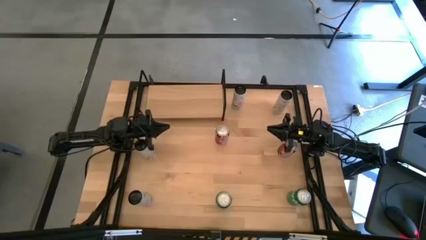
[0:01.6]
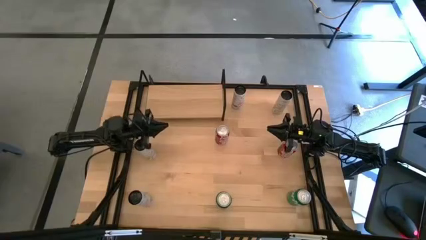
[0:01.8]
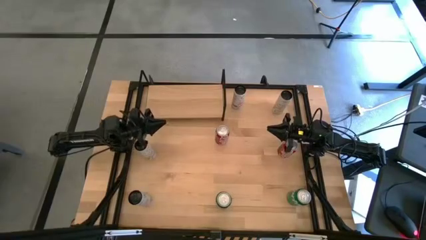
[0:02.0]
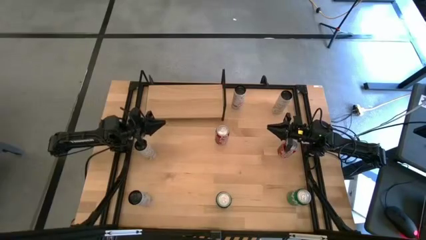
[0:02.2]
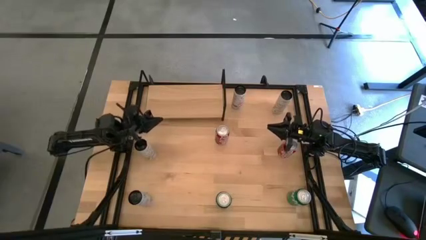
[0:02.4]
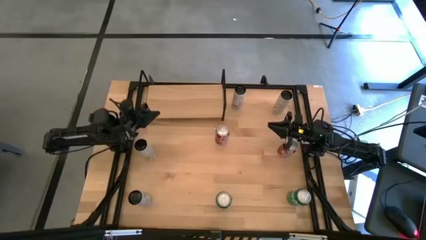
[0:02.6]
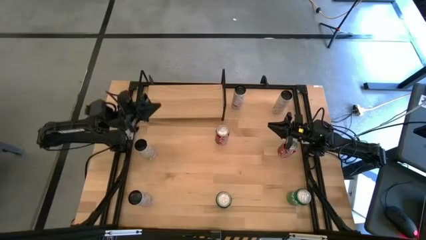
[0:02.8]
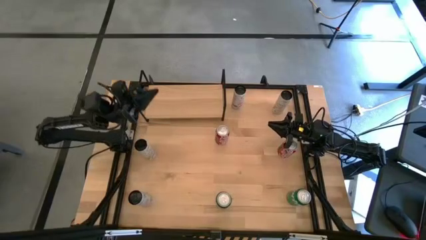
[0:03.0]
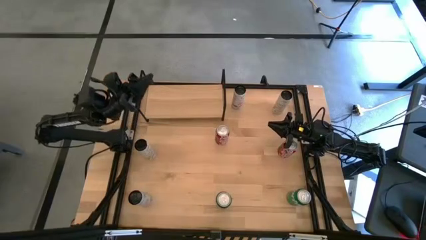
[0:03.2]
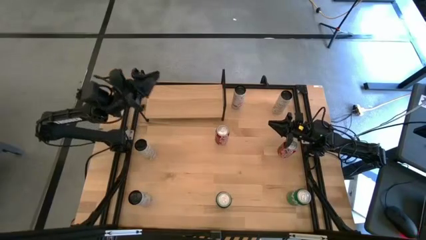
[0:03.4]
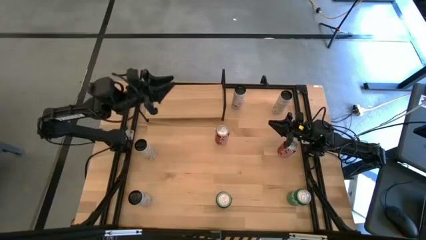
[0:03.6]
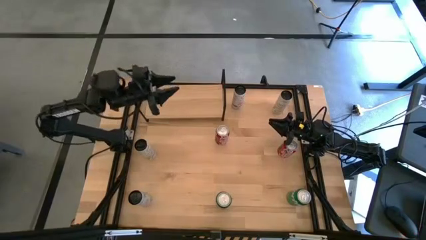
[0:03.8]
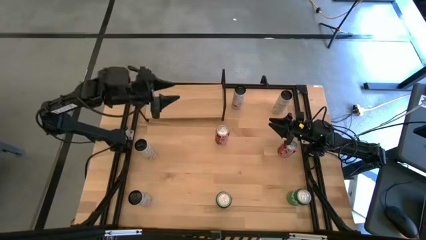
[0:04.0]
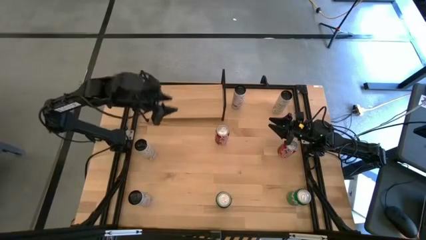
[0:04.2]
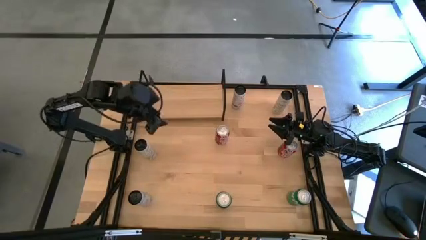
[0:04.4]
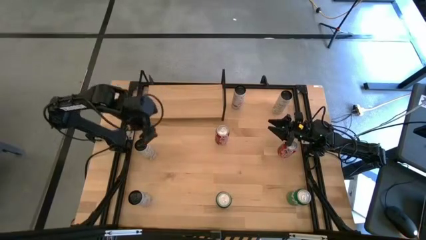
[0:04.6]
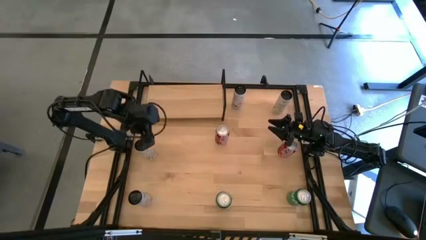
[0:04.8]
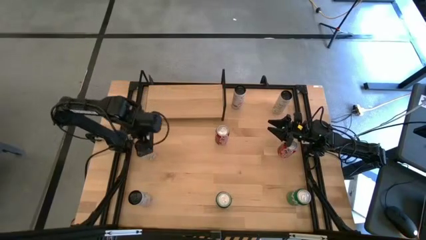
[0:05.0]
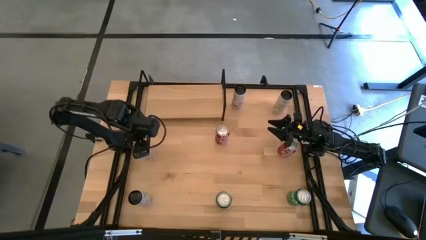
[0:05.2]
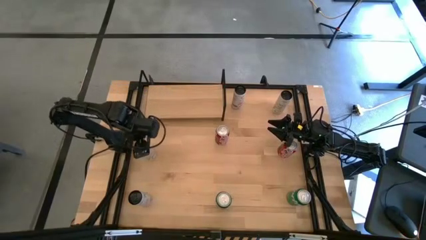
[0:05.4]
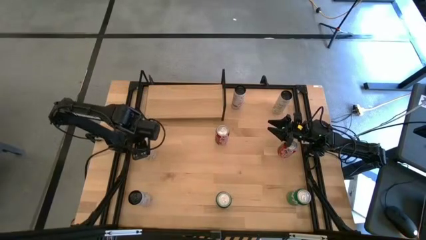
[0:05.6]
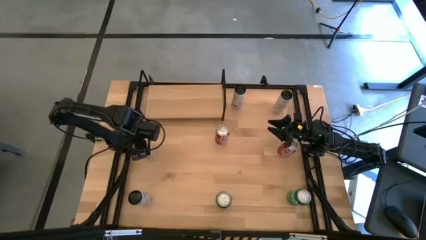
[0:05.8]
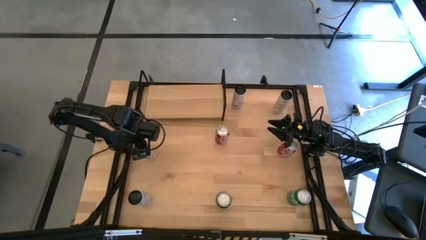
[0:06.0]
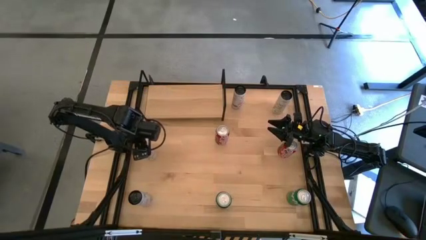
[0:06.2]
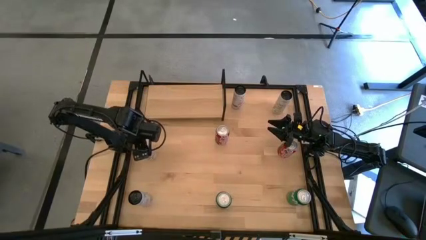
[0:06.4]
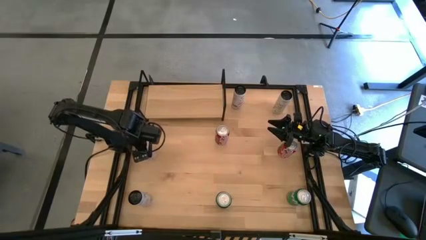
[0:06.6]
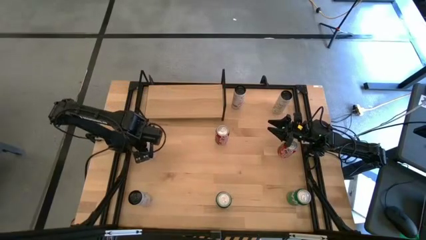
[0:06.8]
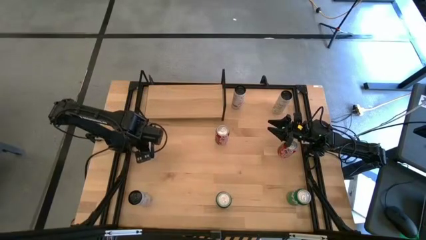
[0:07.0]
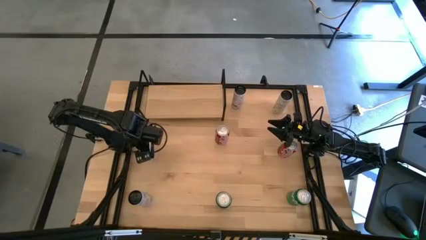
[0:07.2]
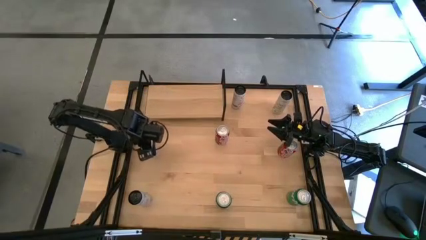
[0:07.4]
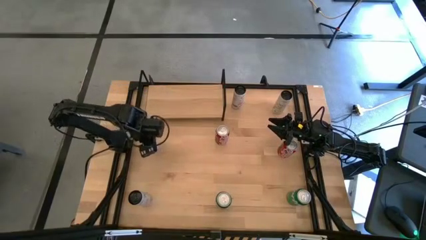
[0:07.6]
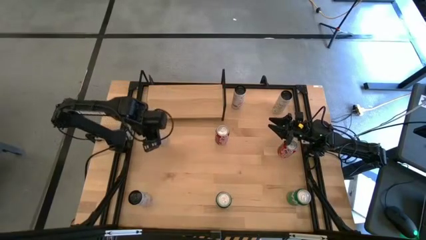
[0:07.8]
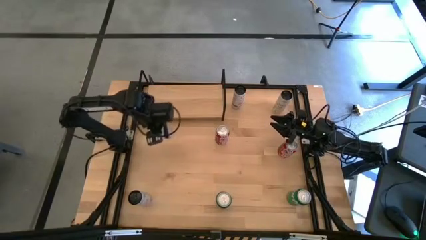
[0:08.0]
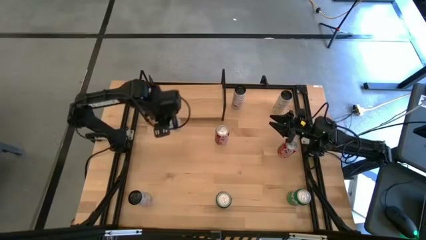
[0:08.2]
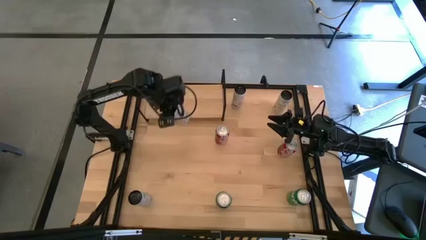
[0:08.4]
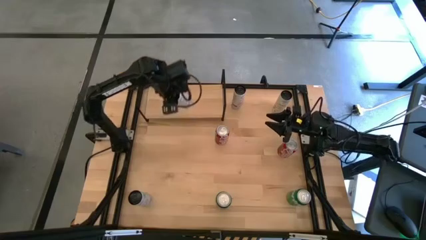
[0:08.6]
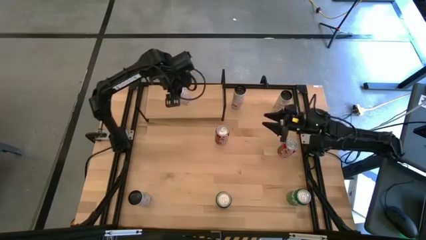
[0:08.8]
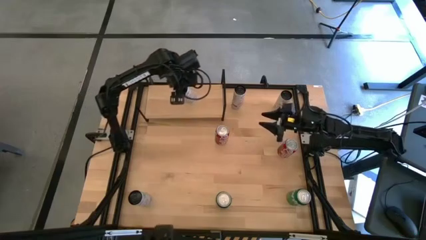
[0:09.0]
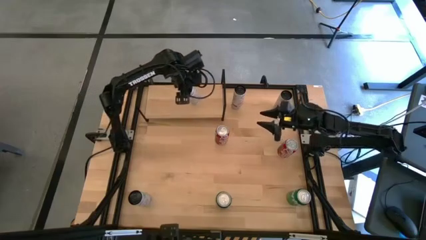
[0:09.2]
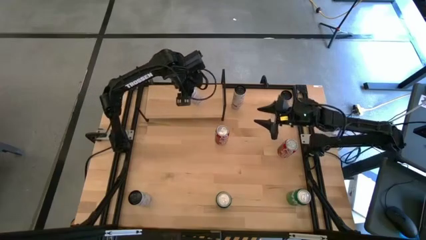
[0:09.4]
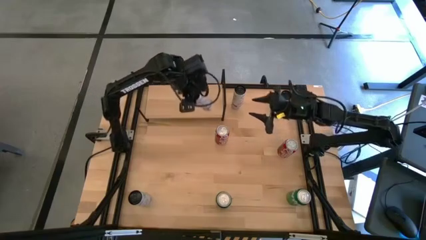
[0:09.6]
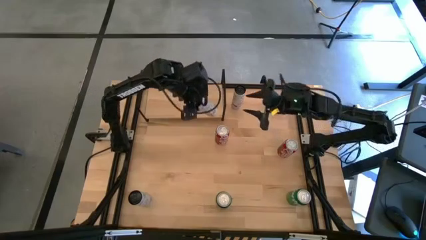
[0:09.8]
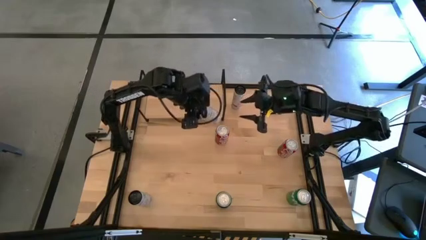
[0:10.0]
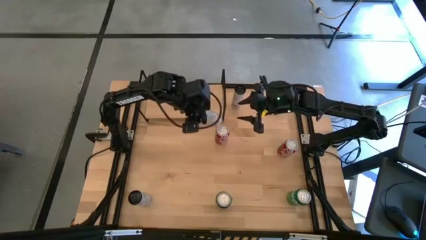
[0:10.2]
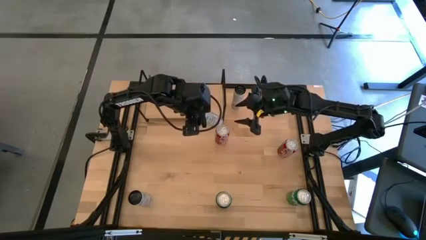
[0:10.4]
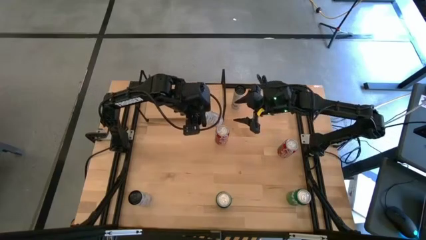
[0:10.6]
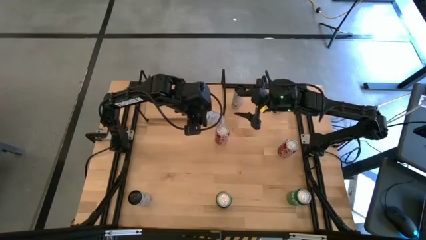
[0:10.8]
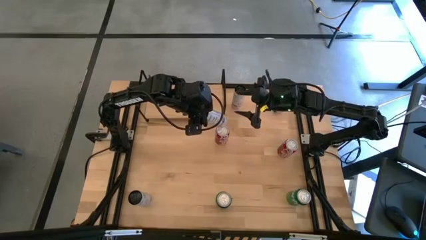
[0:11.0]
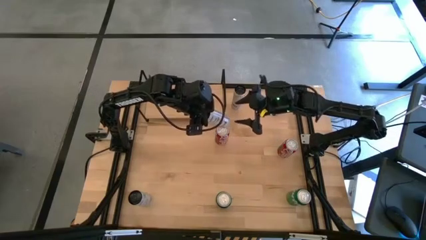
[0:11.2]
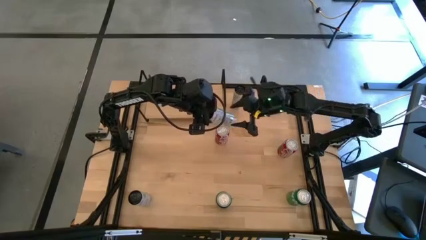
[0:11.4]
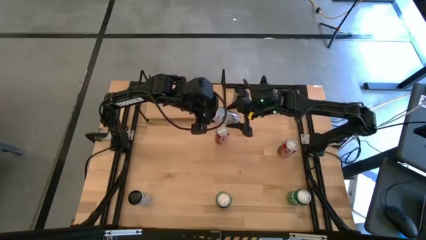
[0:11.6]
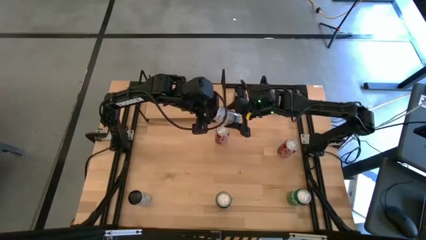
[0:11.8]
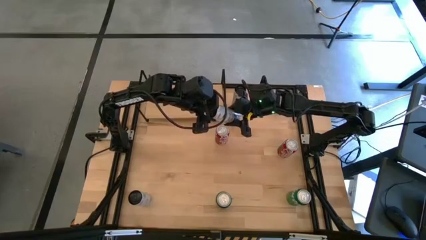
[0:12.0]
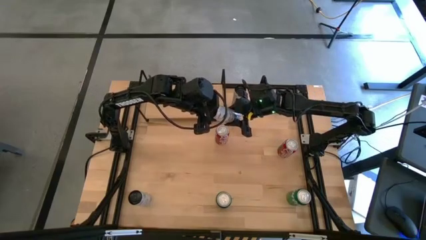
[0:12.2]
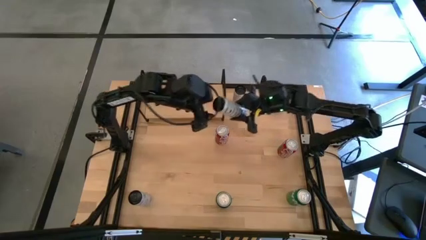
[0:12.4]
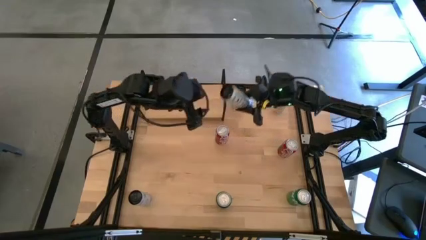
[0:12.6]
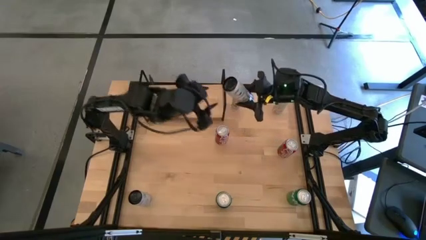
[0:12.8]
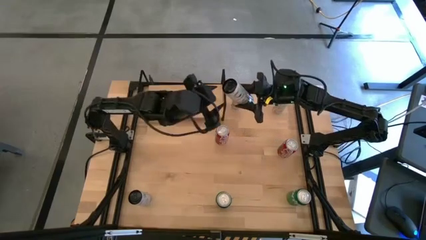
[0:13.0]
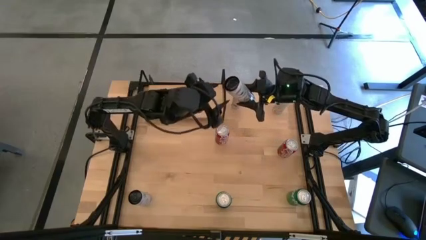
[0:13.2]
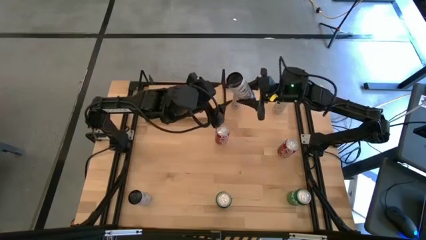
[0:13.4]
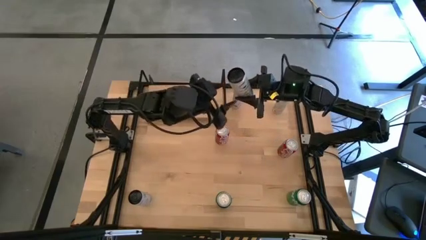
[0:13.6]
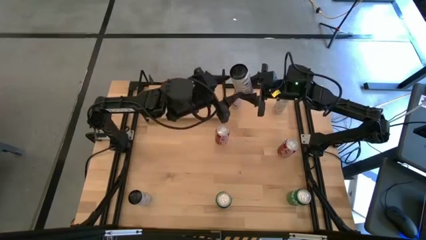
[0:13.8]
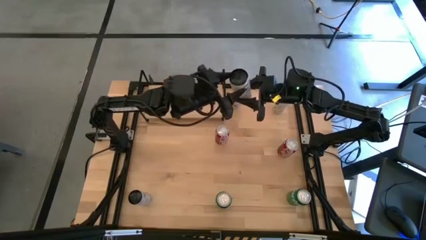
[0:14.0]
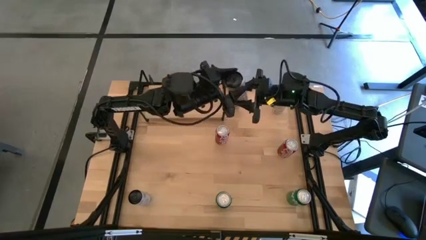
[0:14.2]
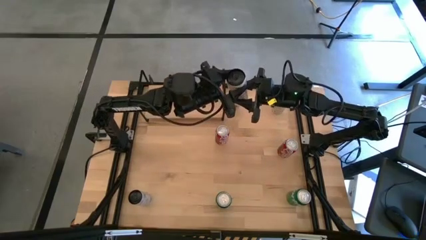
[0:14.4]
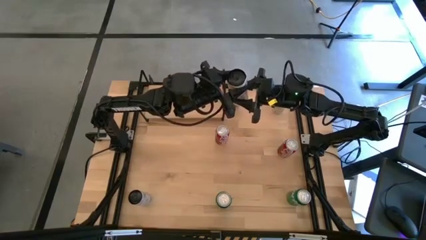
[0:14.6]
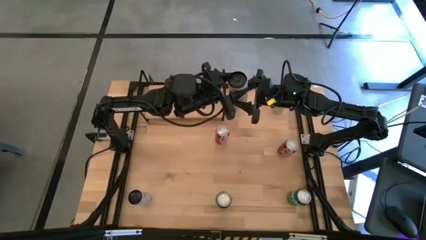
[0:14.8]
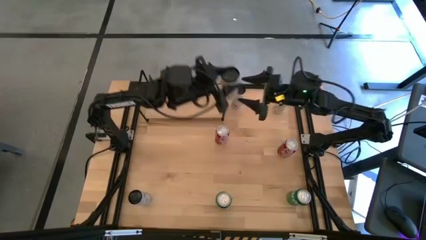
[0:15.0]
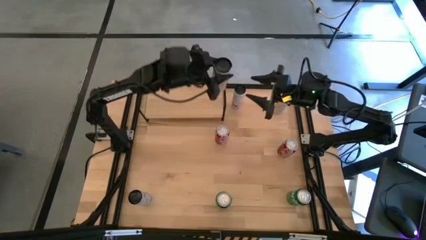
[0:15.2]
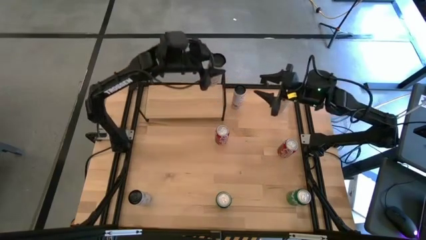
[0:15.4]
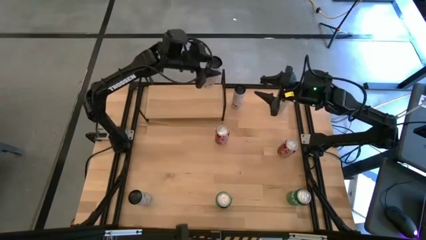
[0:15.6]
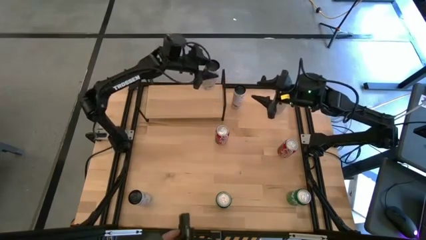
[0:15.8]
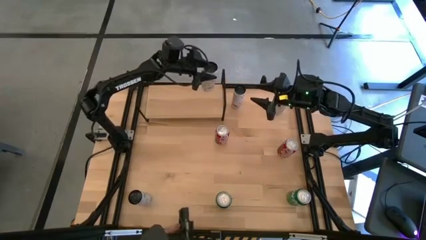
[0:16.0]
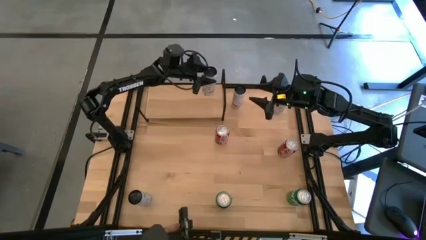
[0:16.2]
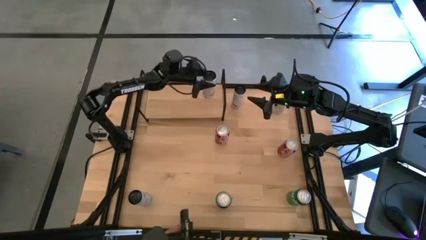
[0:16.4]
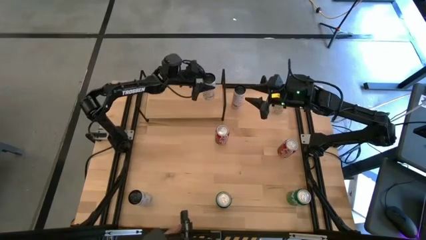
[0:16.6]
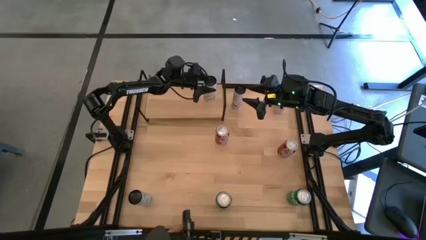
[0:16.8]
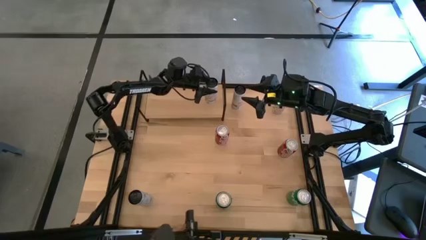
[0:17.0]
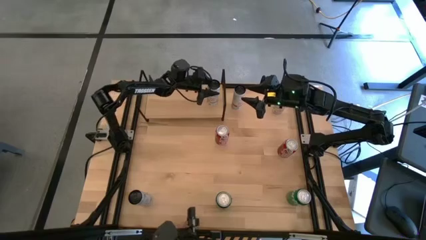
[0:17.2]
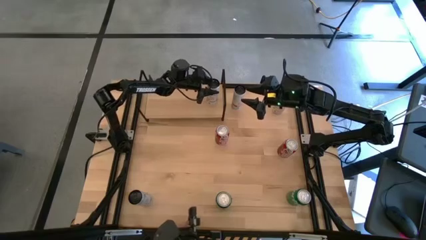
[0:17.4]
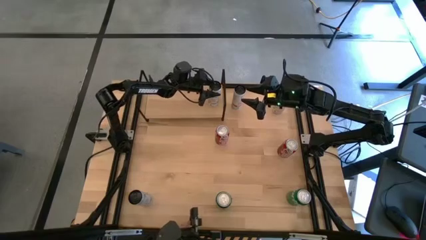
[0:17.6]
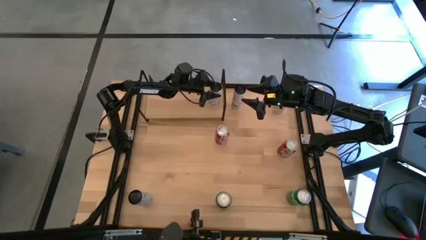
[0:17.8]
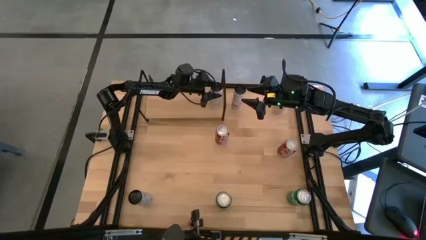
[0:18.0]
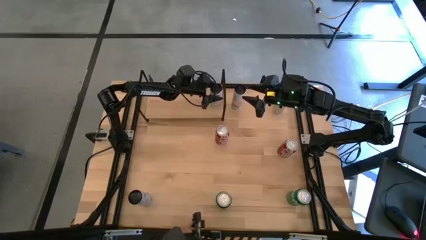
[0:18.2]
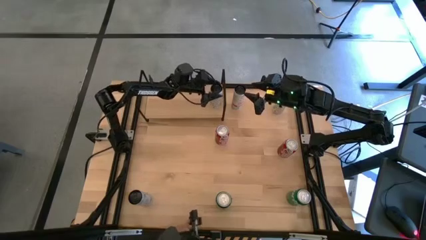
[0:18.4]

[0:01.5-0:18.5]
Task: Place canned beverage on shelf
Put the bottom white yellow soda can on the shelf
